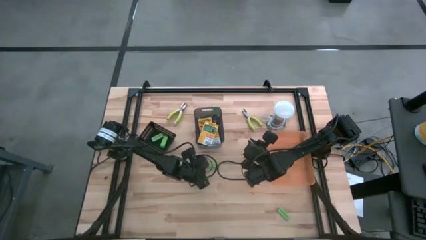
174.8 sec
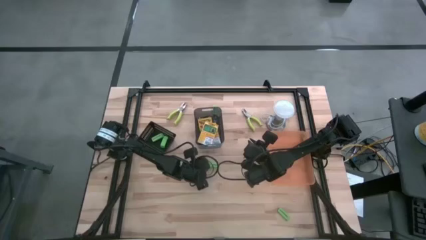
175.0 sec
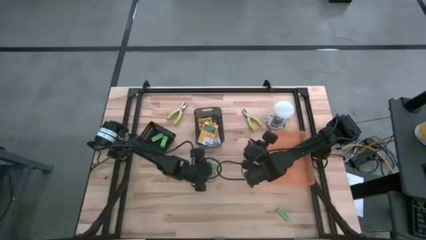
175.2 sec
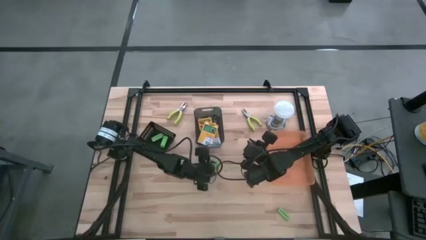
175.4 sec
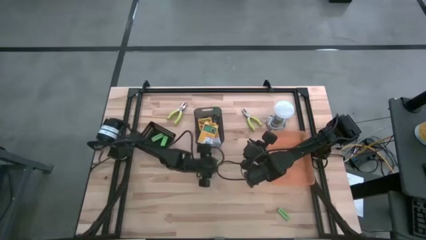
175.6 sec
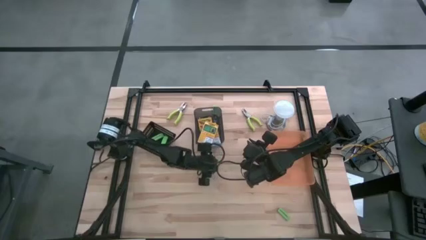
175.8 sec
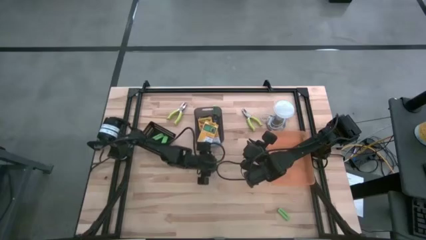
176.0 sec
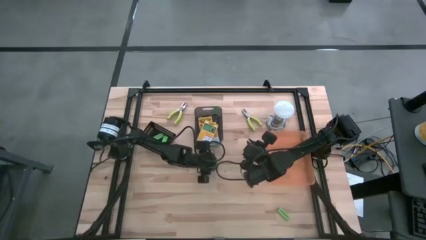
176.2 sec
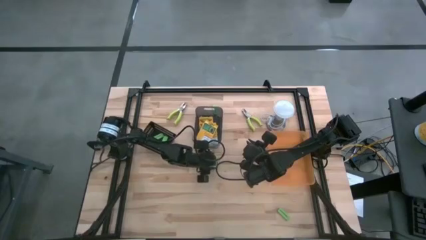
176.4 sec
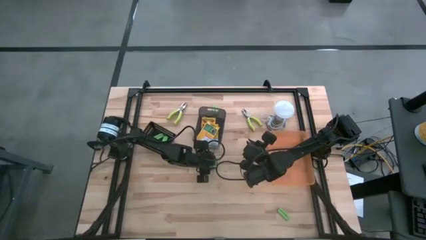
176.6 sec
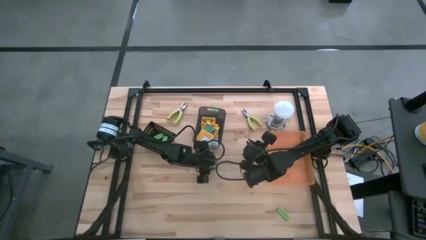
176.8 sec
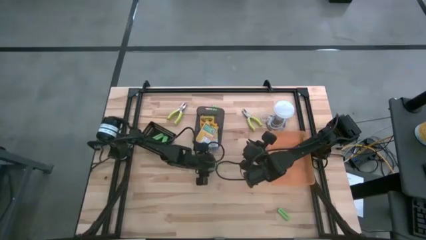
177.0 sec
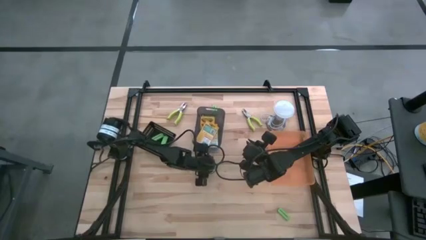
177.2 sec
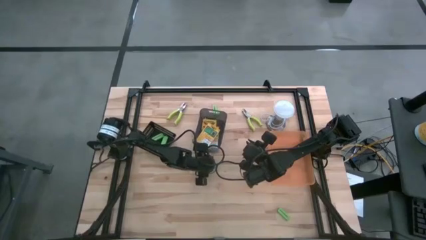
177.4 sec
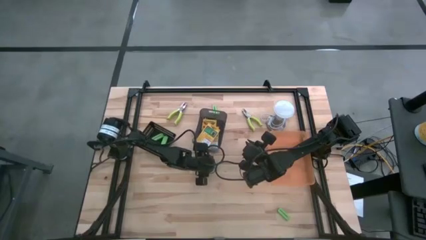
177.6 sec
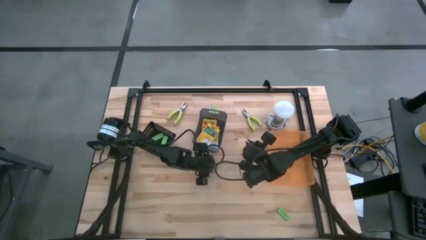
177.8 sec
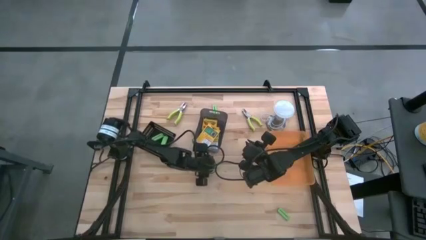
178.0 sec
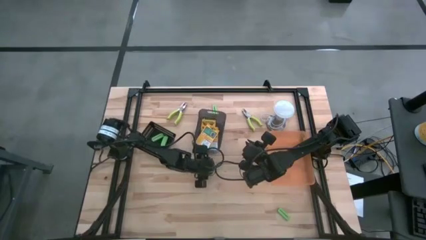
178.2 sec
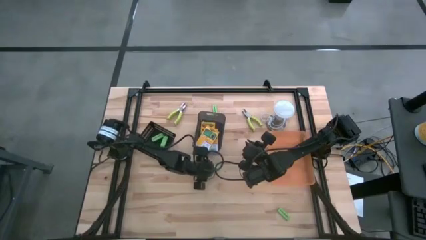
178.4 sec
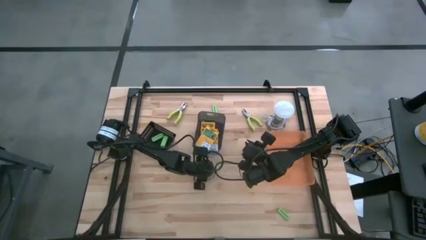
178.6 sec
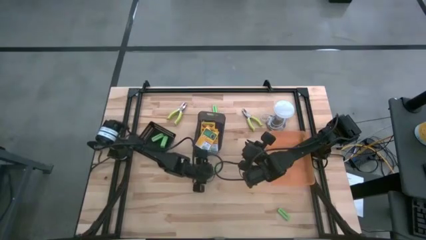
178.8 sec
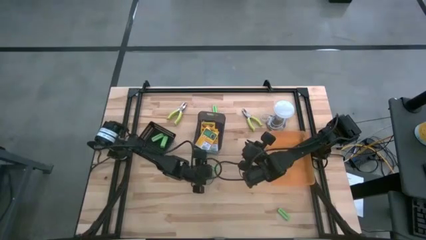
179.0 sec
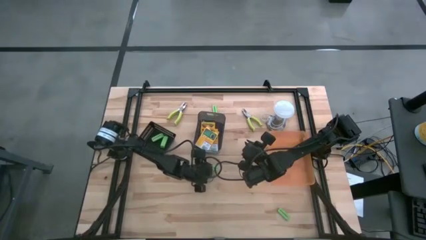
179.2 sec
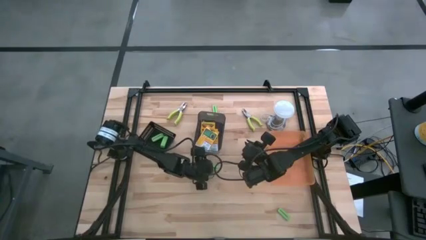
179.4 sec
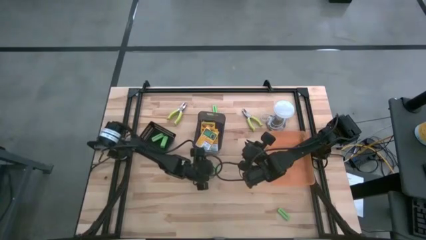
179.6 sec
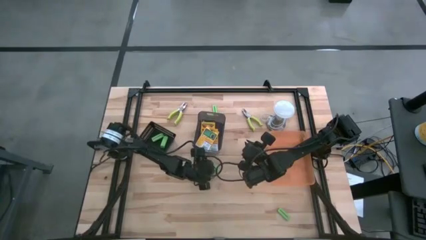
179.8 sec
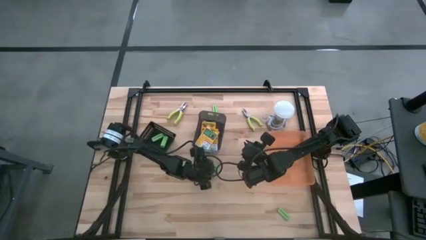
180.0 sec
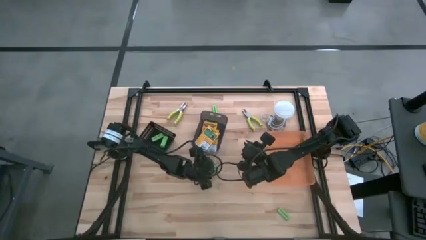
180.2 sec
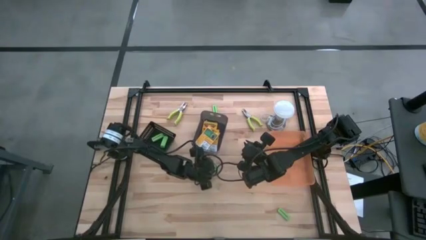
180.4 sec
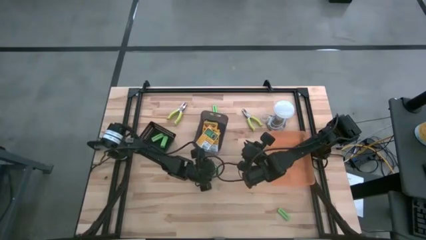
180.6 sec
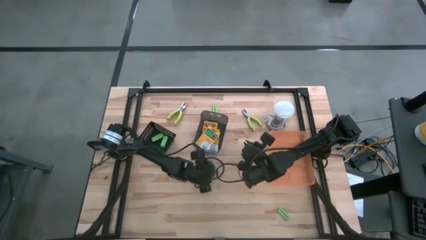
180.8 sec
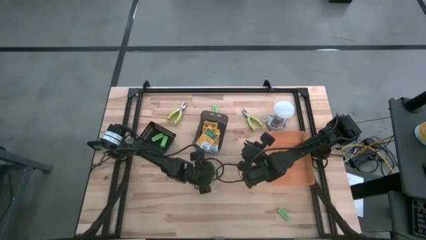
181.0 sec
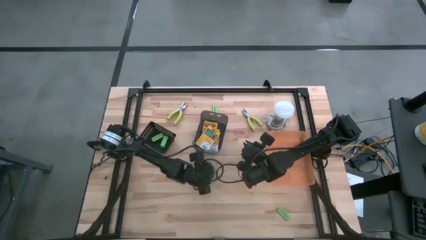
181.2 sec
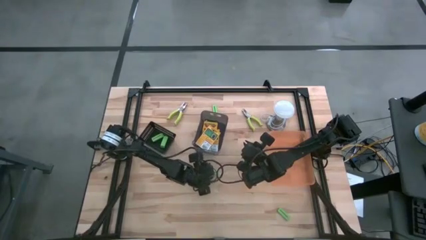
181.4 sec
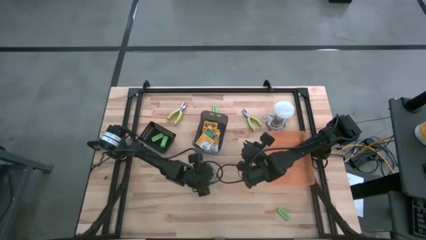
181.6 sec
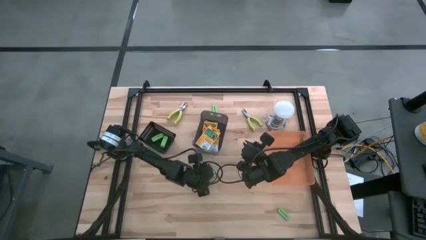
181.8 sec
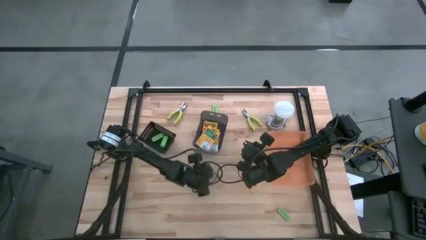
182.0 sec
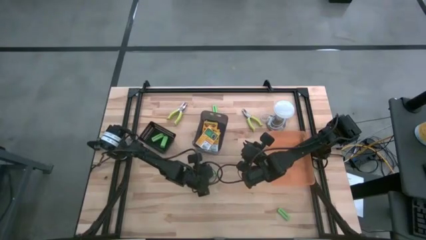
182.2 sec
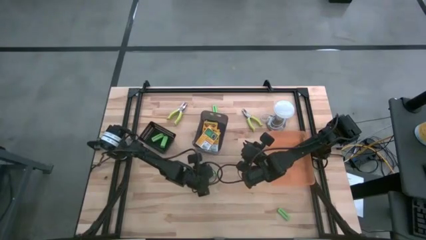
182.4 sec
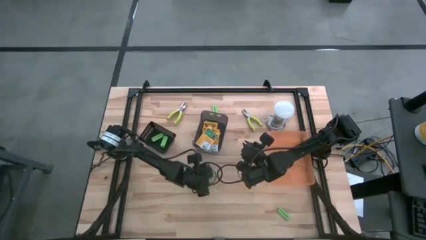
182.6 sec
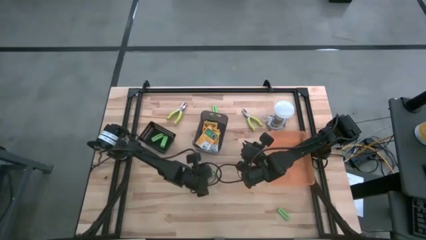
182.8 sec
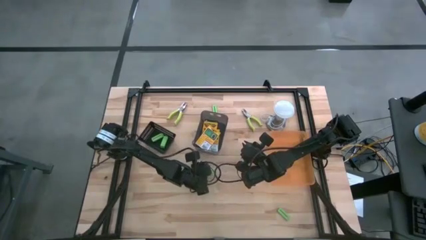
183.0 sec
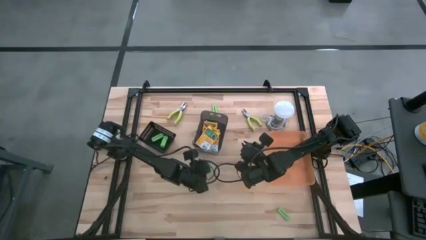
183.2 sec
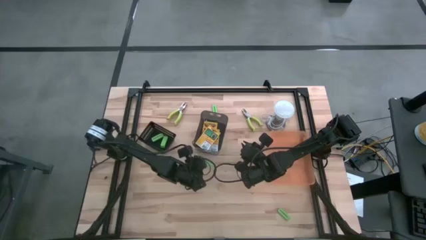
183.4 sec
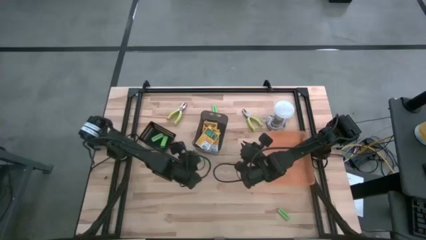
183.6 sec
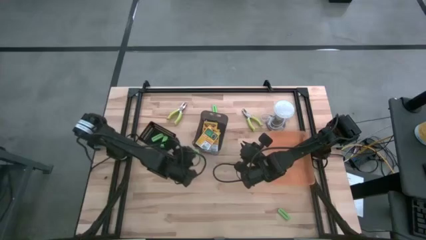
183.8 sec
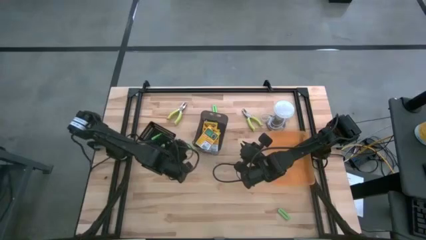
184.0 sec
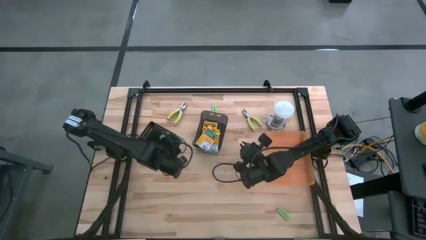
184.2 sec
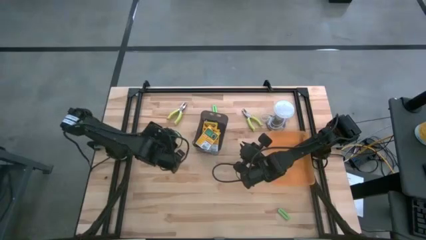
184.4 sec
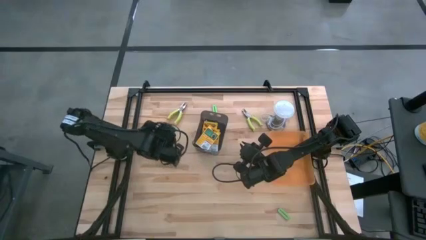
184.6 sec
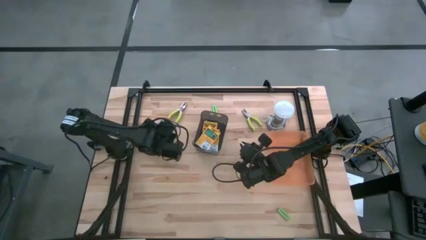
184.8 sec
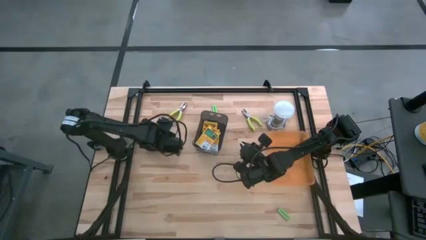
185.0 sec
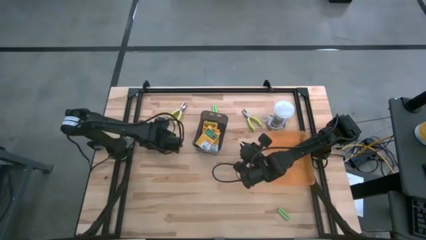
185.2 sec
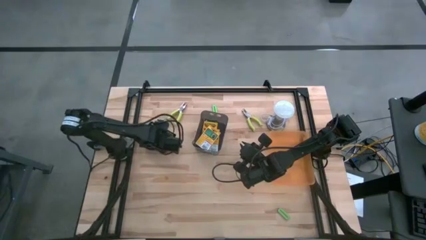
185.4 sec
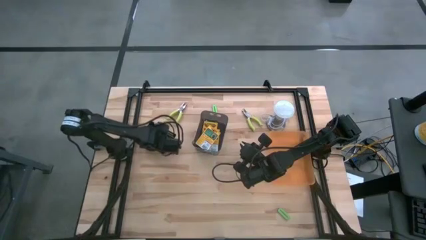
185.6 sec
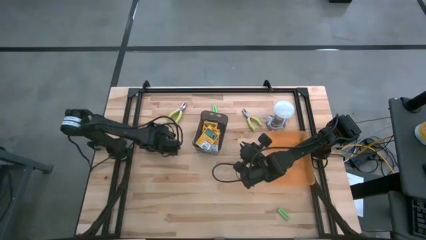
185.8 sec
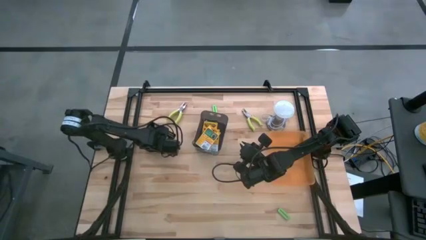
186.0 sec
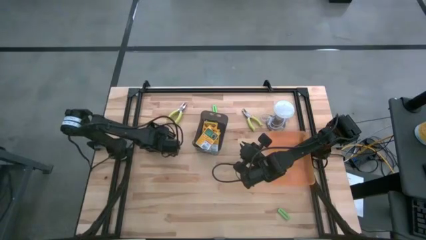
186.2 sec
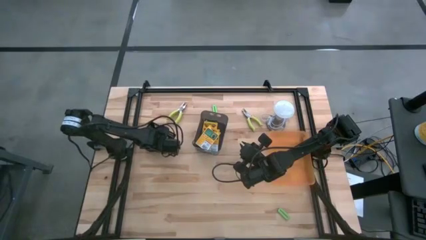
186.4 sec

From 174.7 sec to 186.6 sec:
Task: Pick & Place School Supplies
Put the middle light green eraser into the black bin

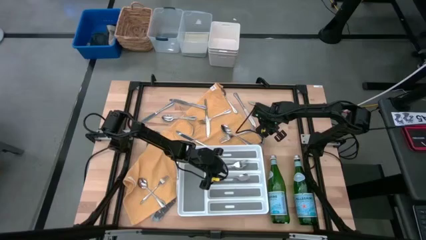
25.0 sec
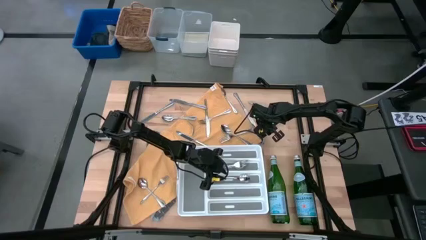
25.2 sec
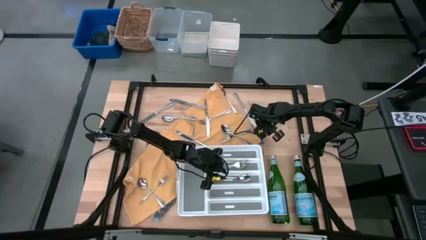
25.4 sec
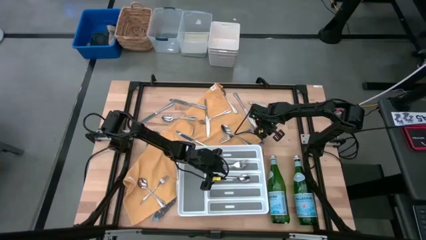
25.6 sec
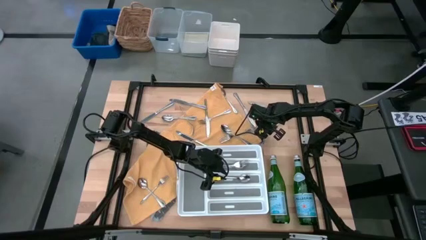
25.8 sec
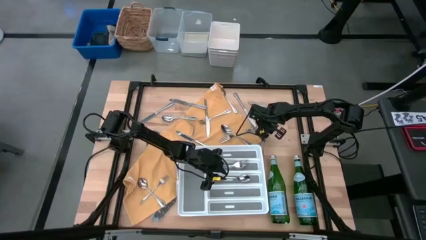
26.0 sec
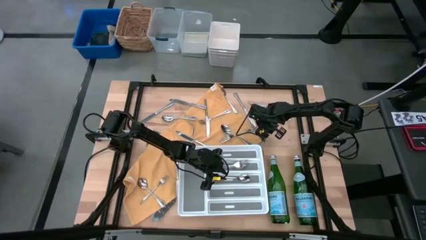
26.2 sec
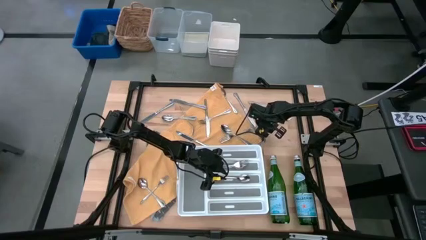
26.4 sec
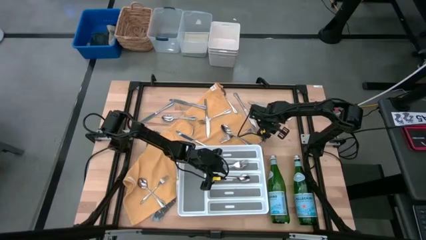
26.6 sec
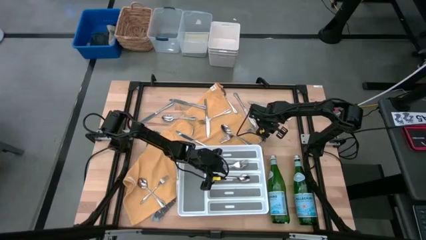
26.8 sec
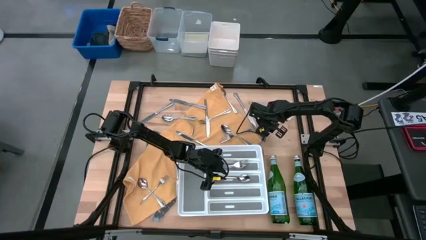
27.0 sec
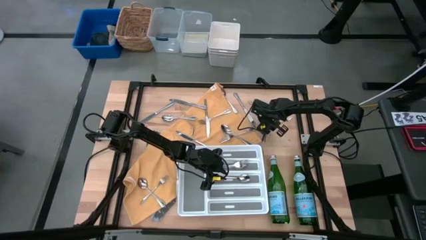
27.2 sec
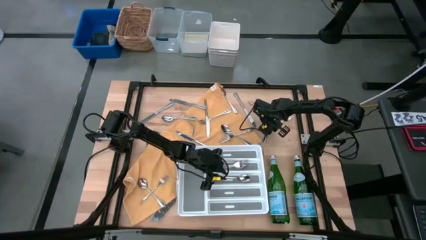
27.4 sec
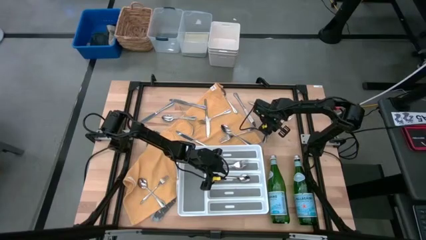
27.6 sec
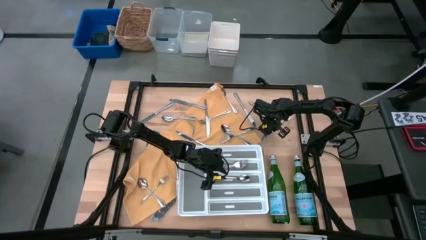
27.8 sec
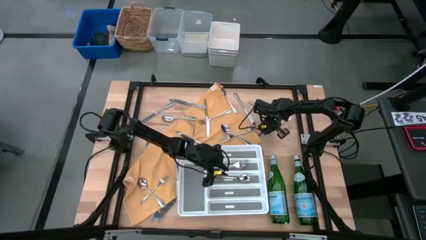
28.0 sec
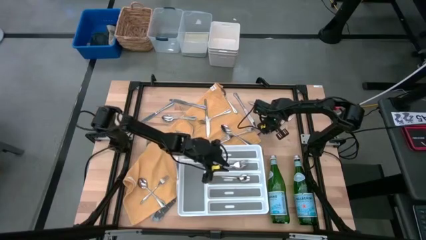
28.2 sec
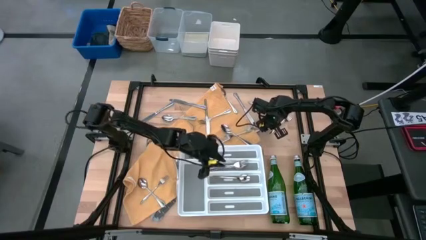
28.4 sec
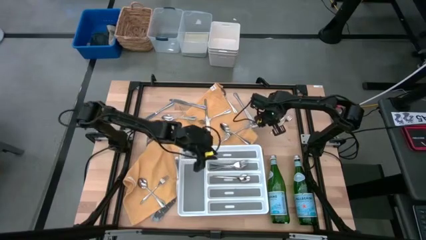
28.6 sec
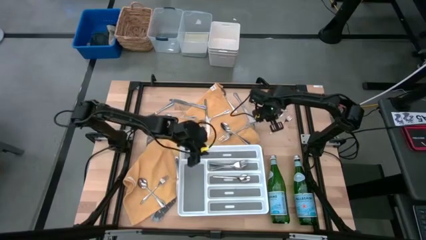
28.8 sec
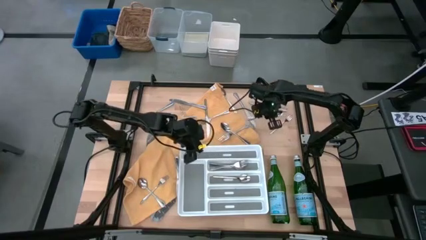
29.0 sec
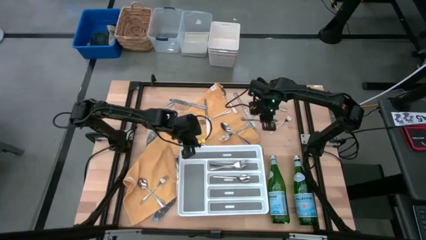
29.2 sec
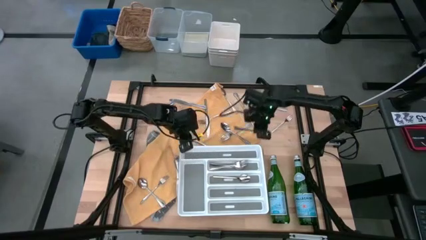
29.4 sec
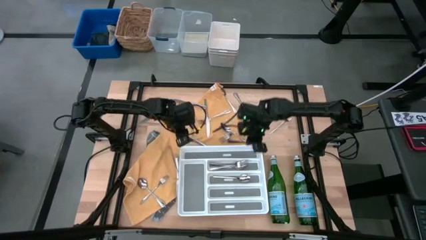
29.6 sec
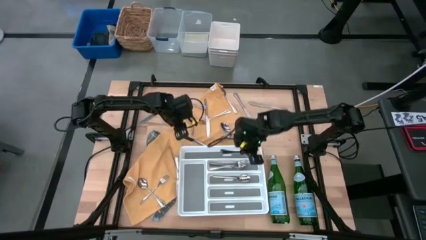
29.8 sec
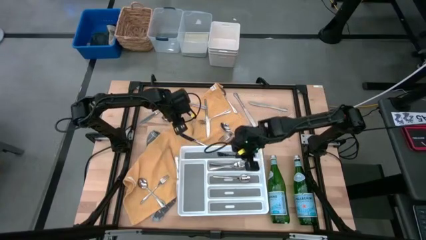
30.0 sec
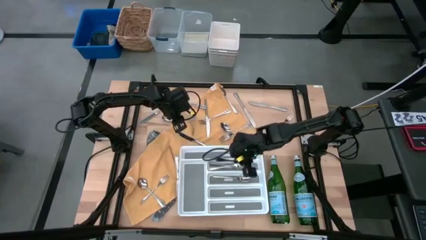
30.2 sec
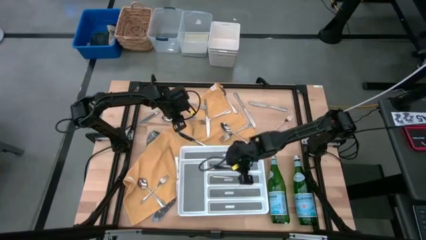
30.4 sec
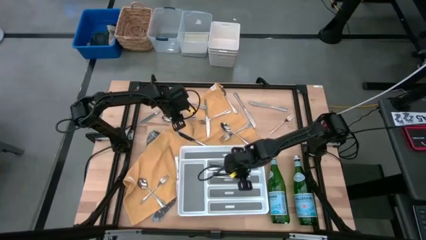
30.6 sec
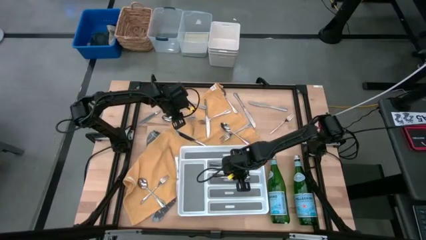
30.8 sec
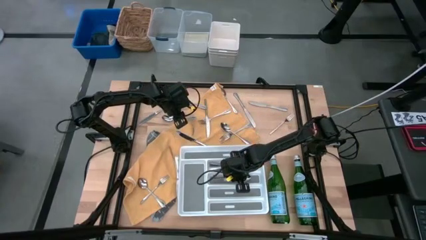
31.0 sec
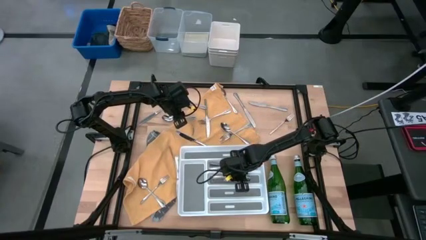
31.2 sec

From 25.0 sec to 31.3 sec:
Task: Sort silverware
Put the silver spoon into the white silverware tray
